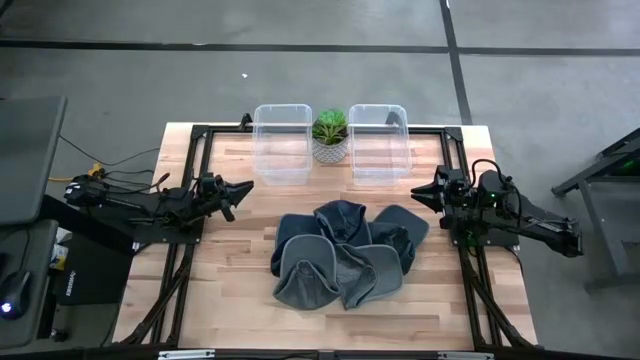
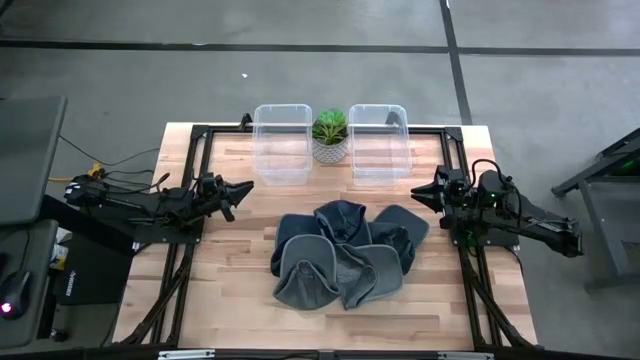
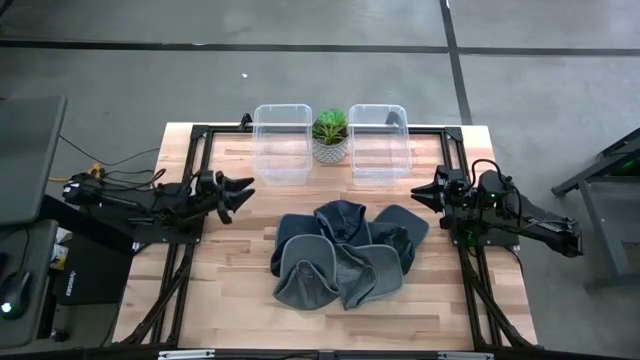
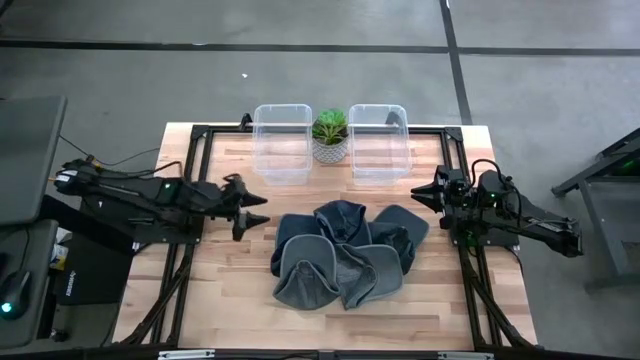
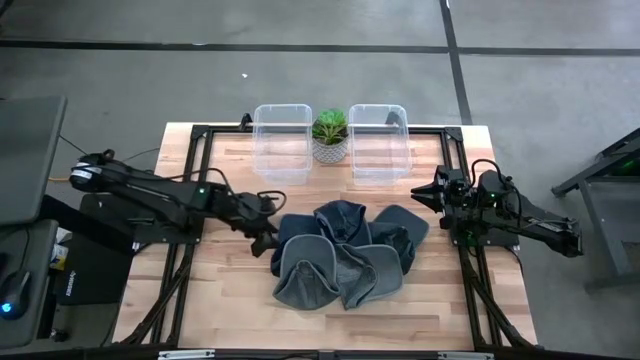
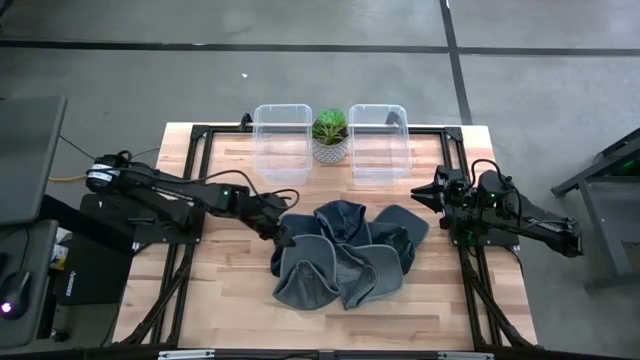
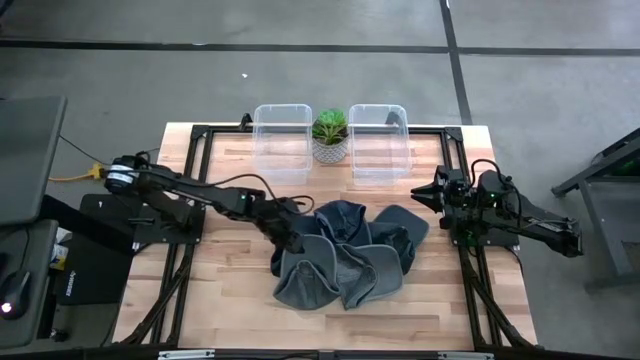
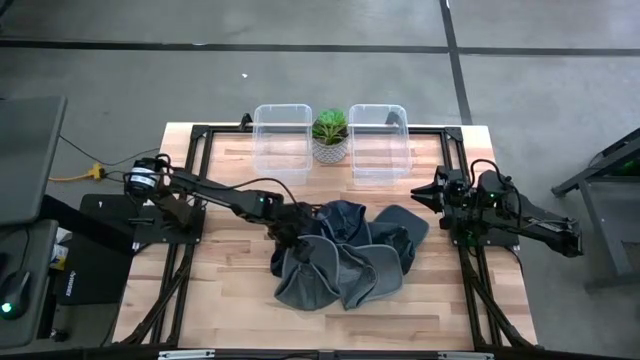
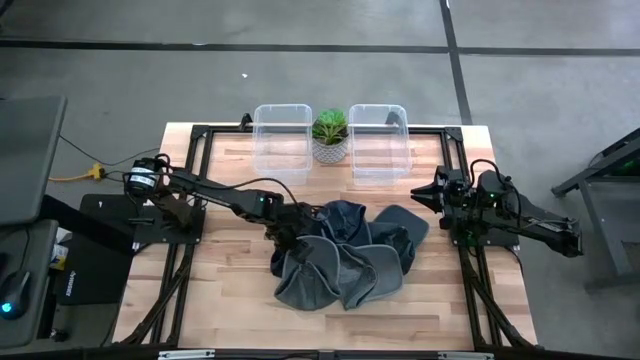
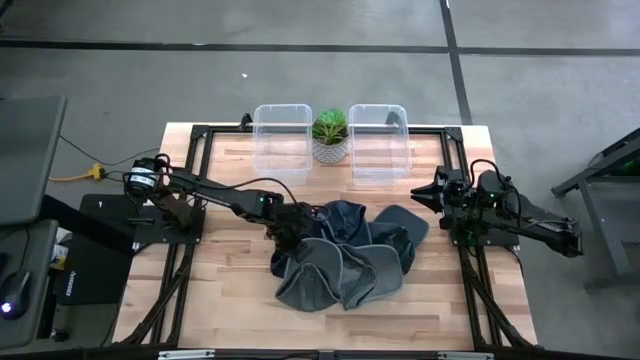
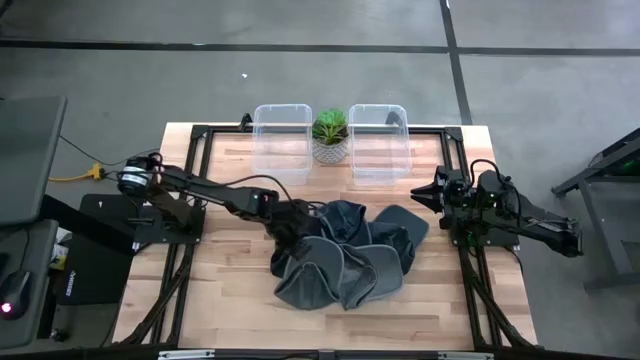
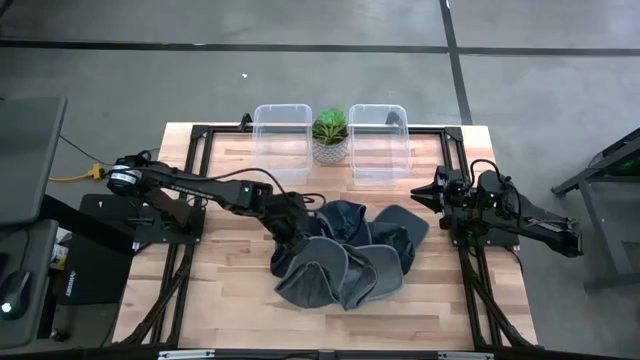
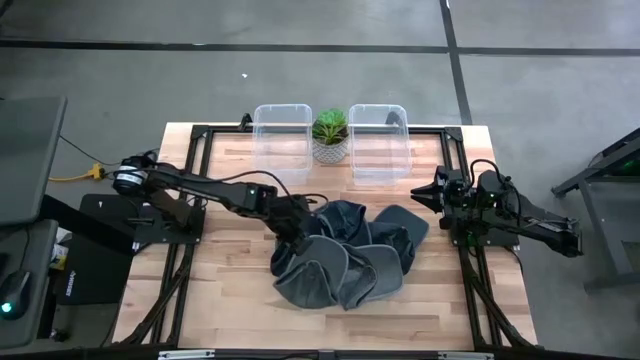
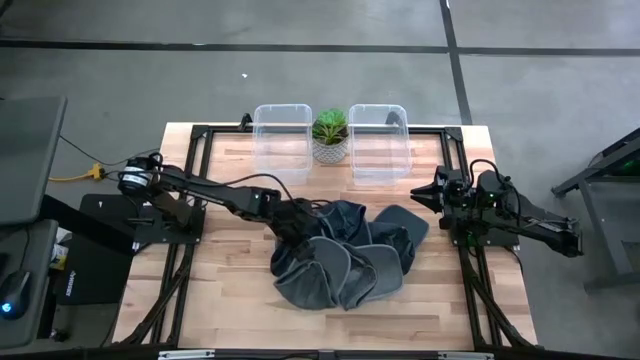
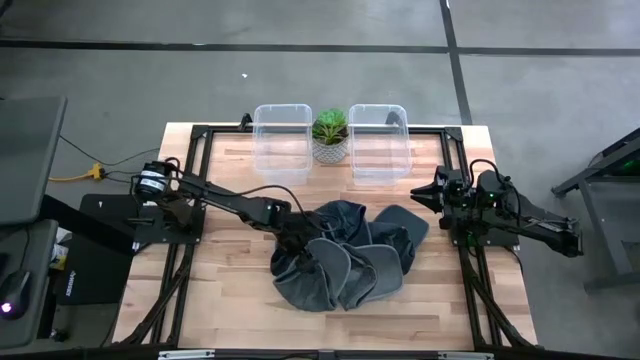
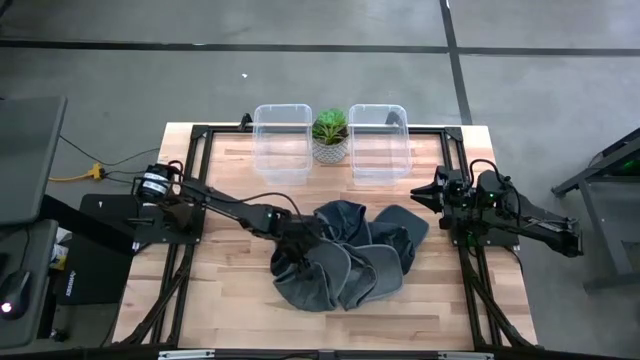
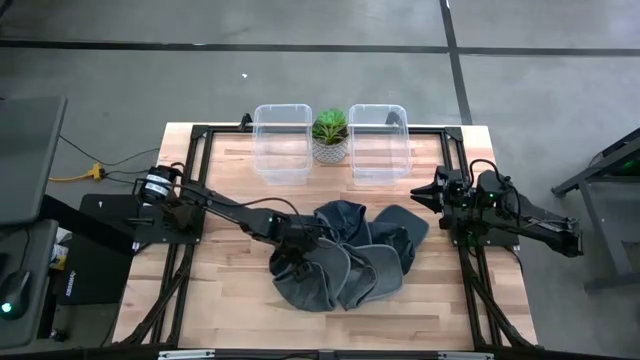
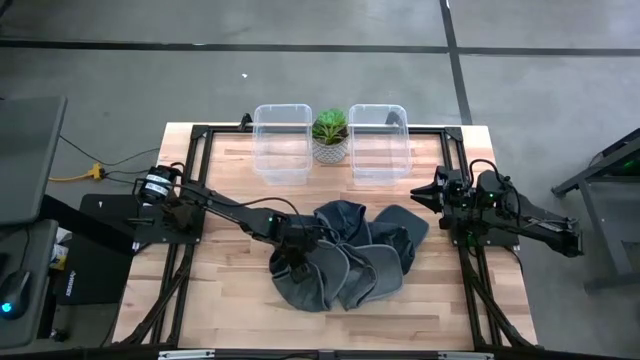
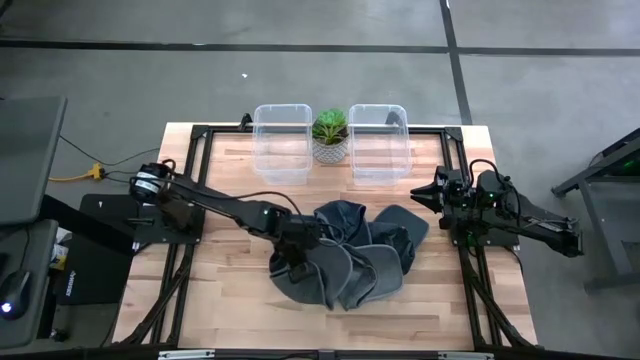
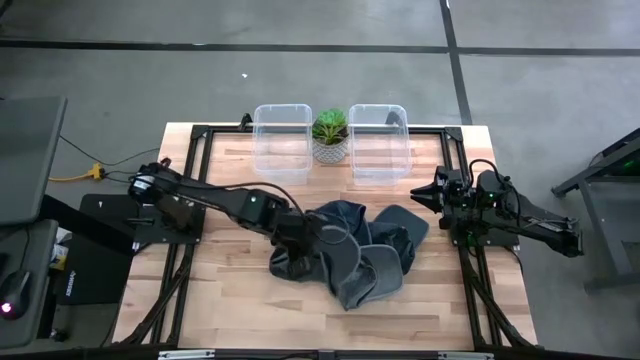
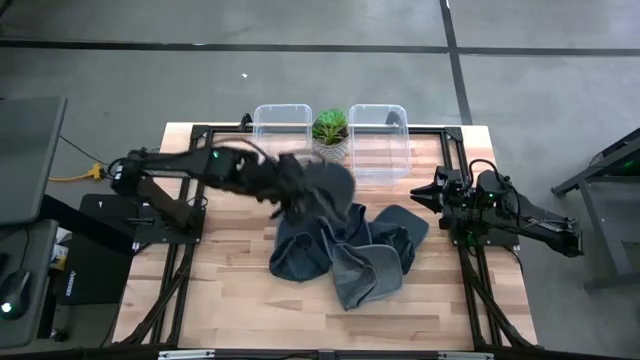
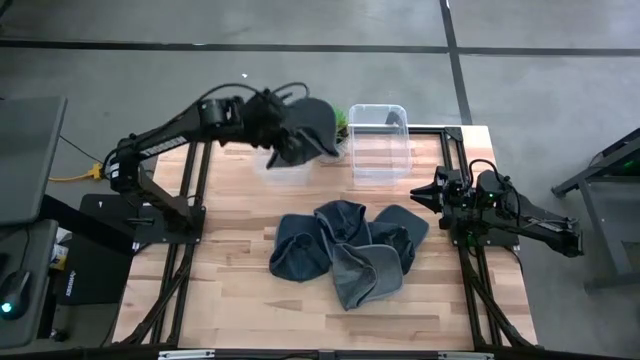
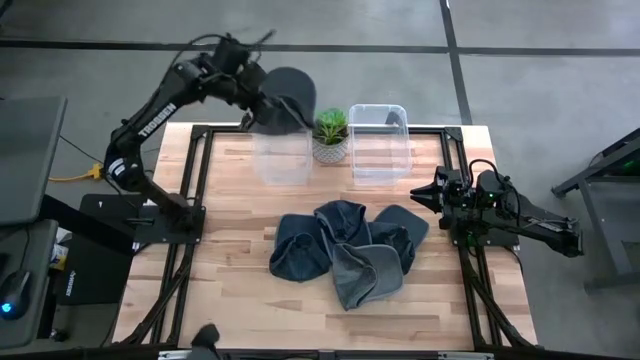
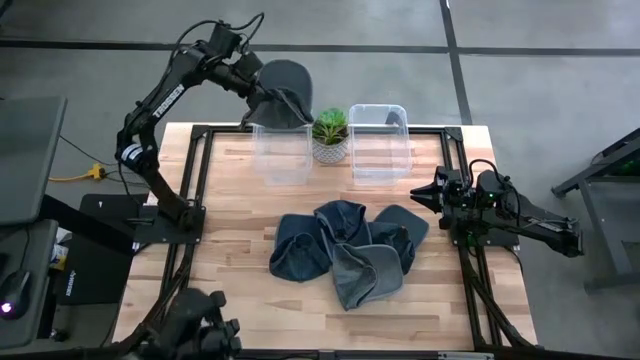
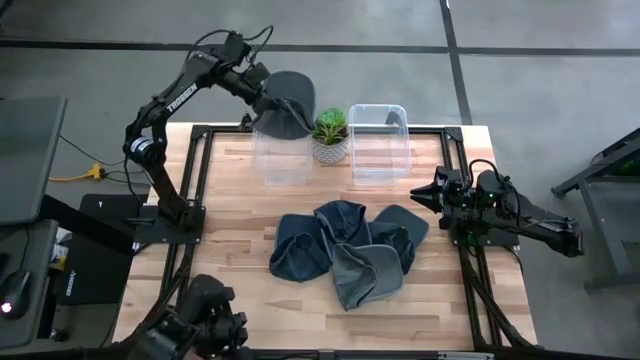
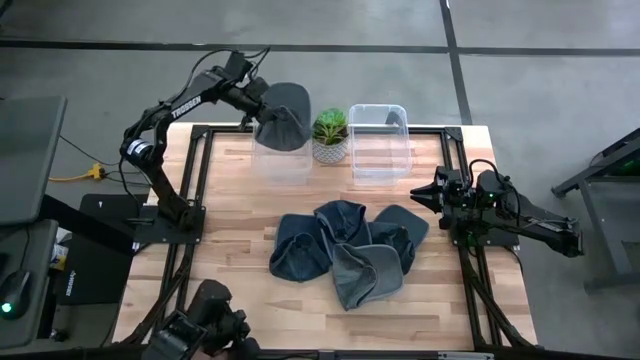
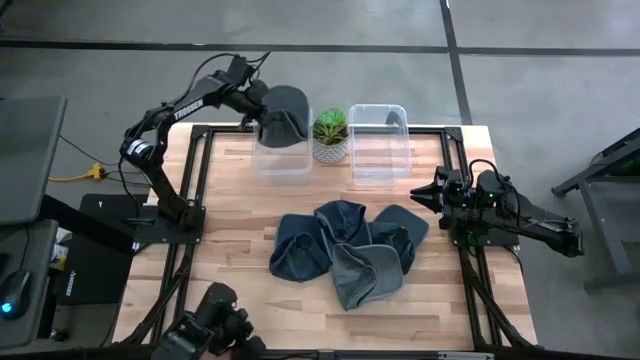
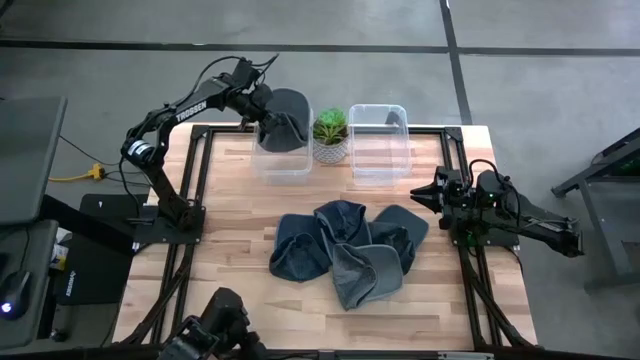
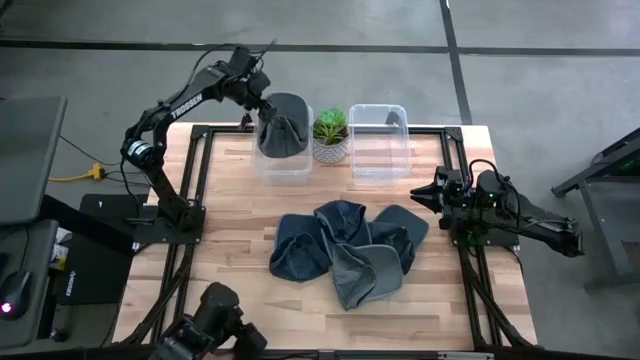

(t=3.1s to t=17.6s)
Task: Pick & Place hat
Put the left gray cap into the left transparent bin

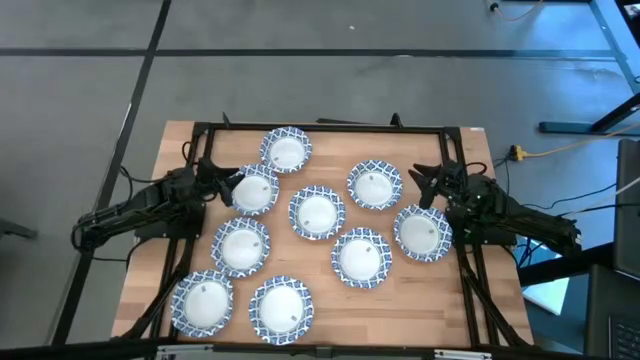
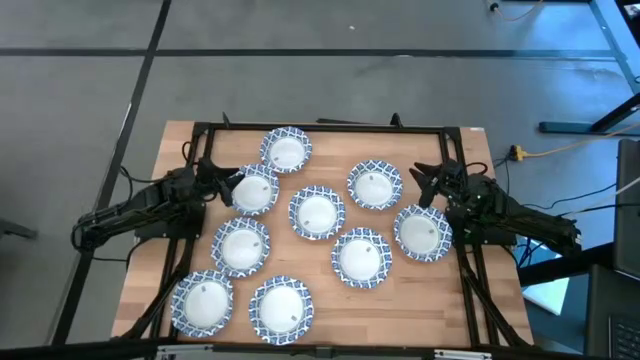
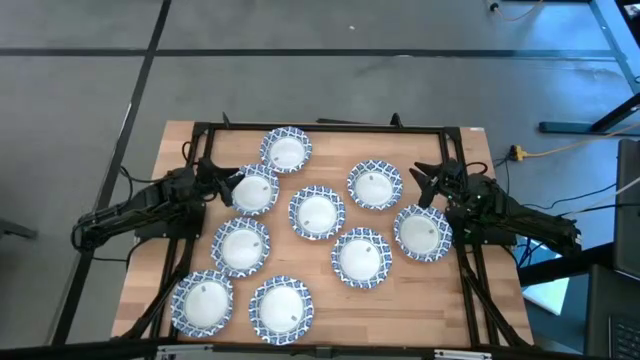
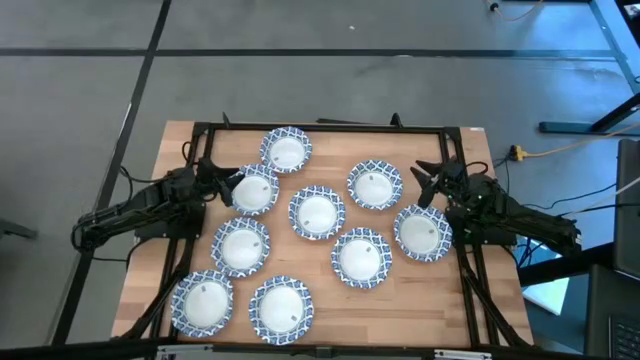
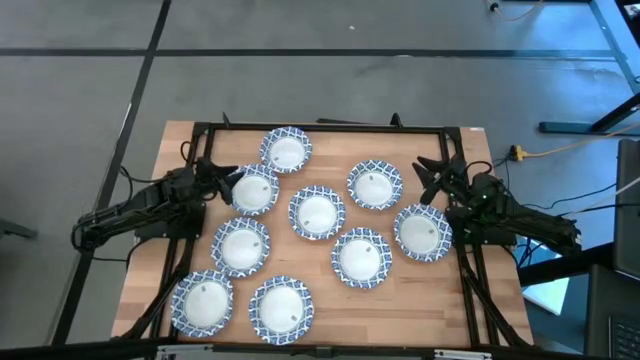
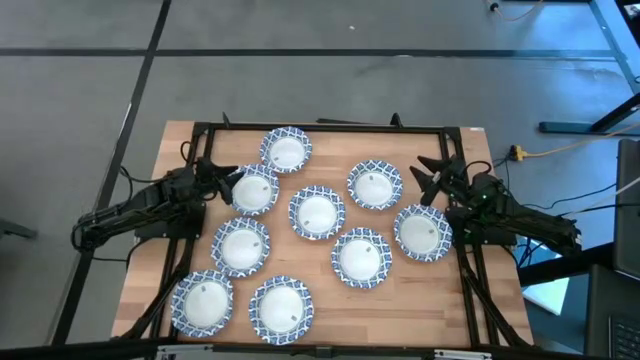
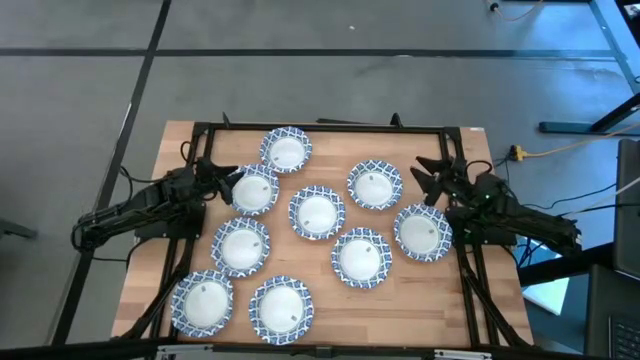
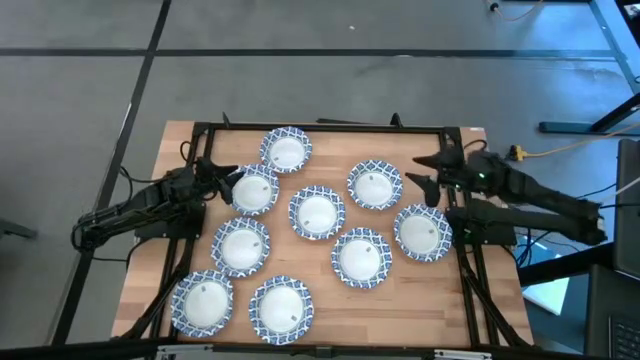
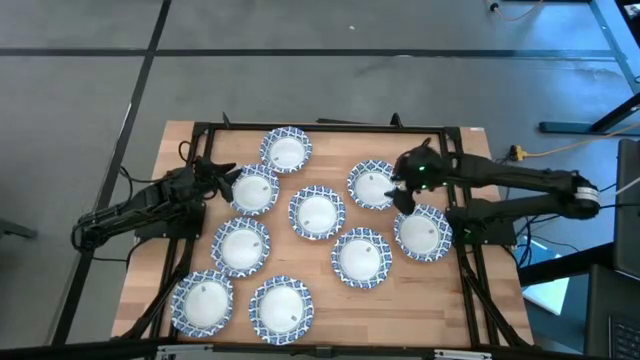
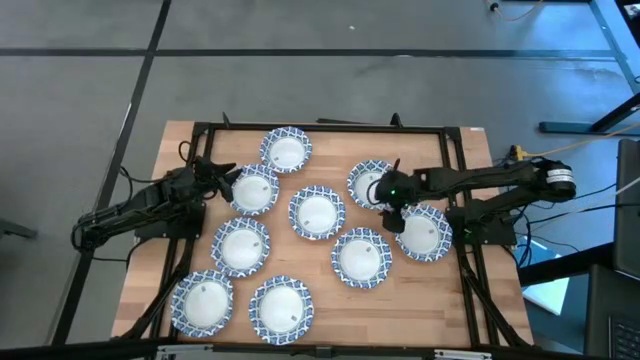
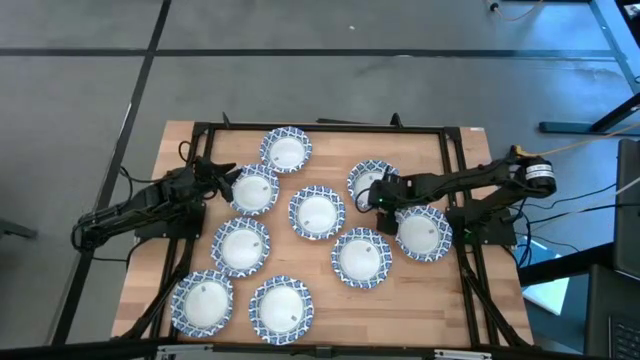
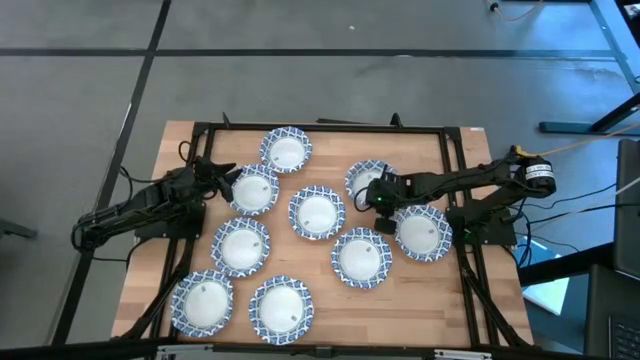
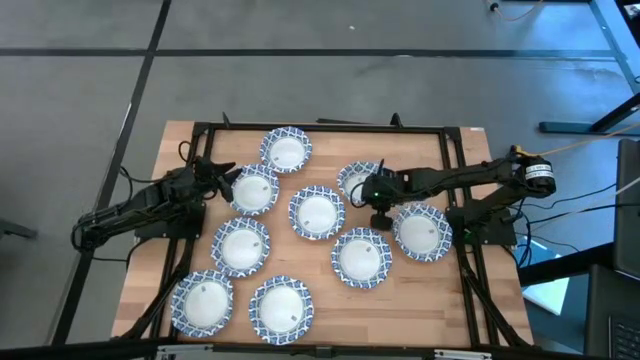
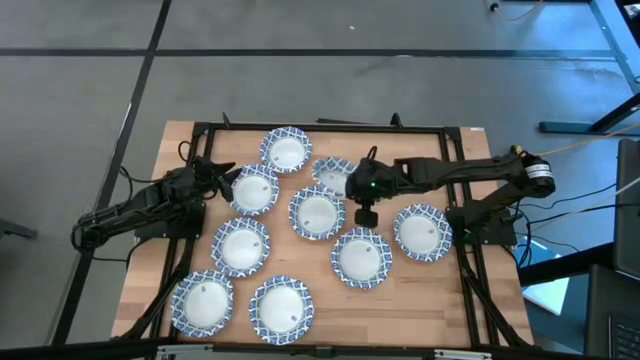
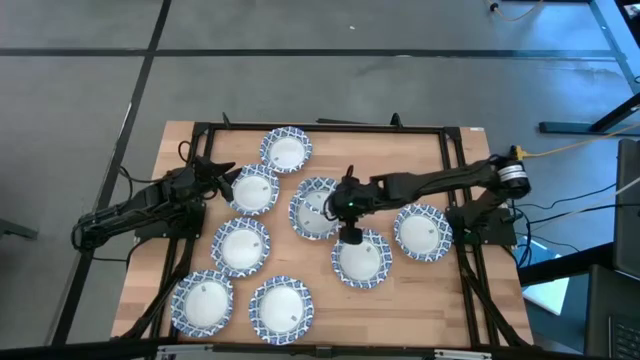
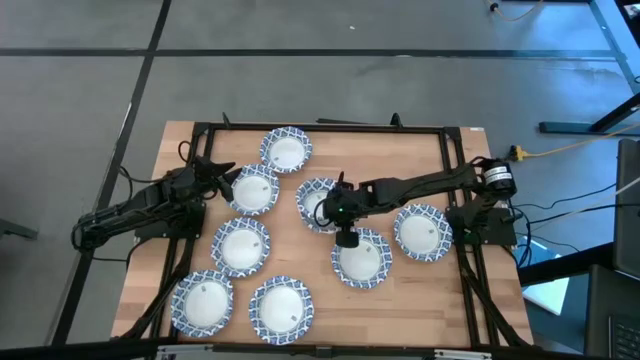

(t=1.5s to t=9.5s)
Task: Nest bowls inside each other
Stack the white bowl on top of the other white bowl
